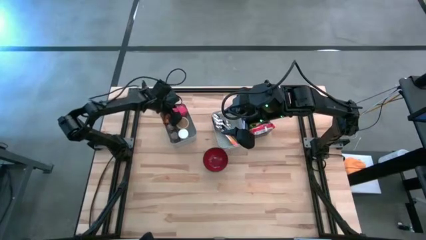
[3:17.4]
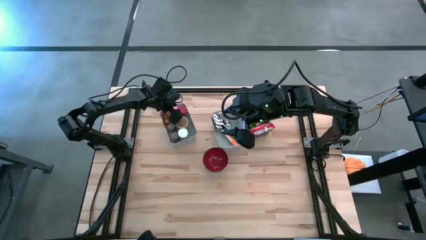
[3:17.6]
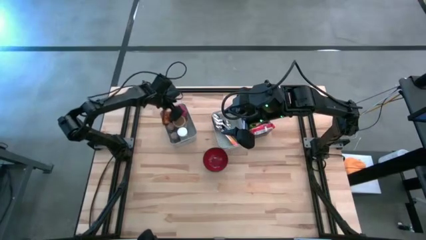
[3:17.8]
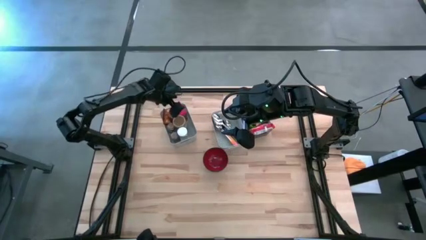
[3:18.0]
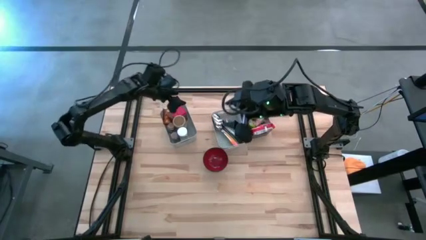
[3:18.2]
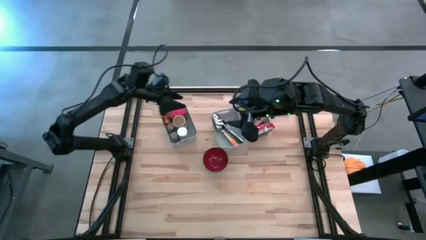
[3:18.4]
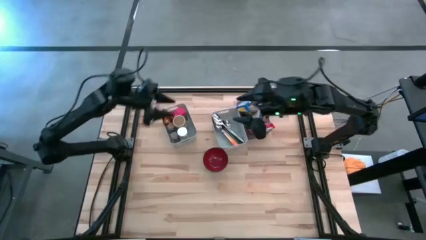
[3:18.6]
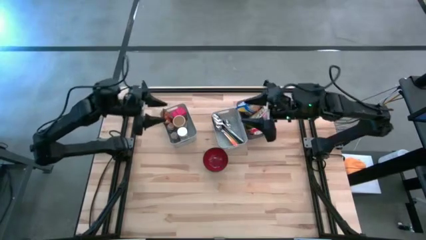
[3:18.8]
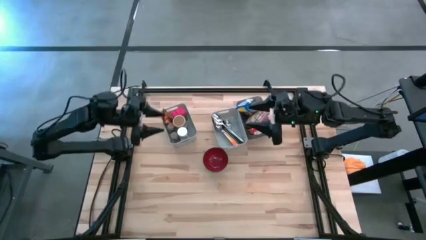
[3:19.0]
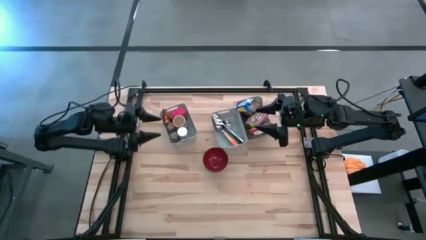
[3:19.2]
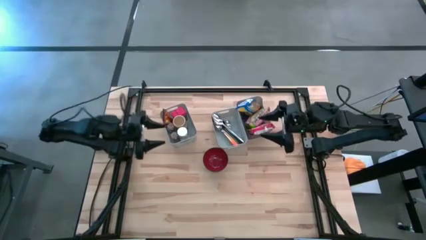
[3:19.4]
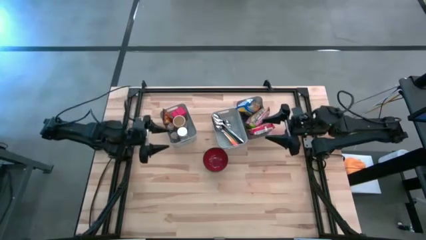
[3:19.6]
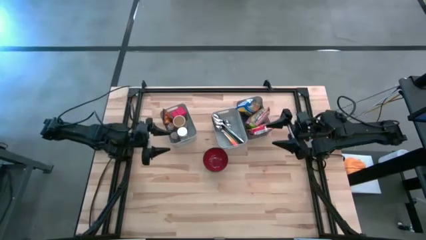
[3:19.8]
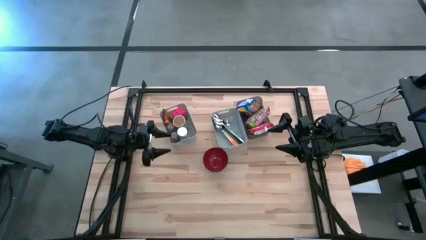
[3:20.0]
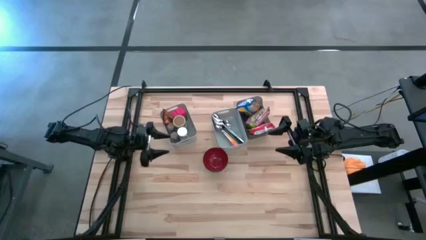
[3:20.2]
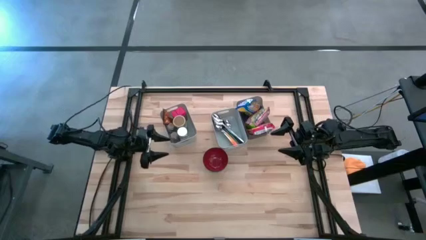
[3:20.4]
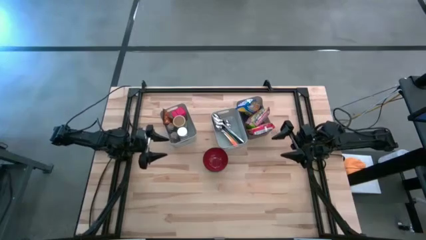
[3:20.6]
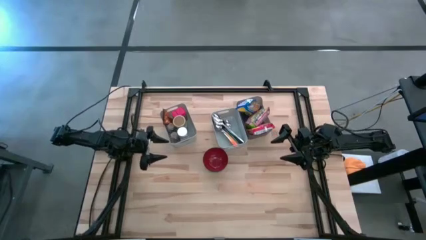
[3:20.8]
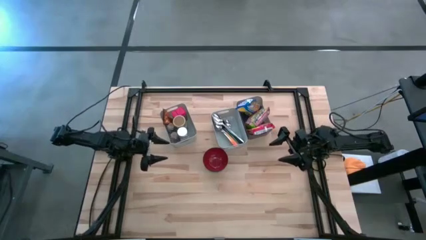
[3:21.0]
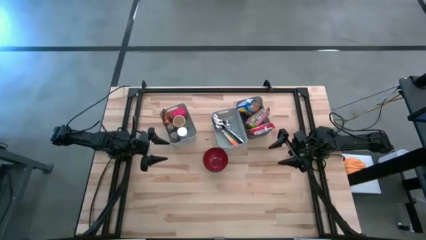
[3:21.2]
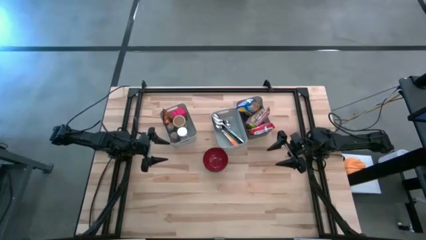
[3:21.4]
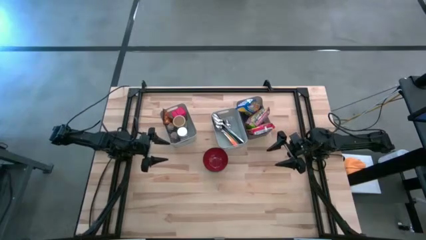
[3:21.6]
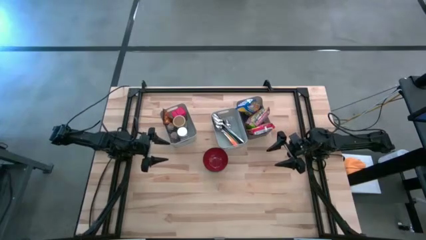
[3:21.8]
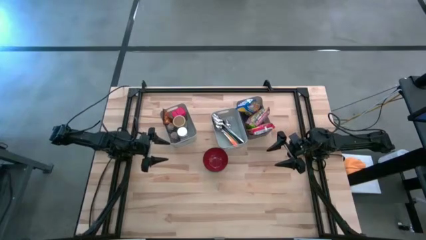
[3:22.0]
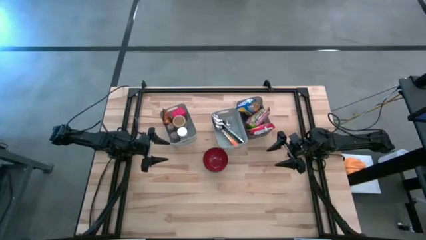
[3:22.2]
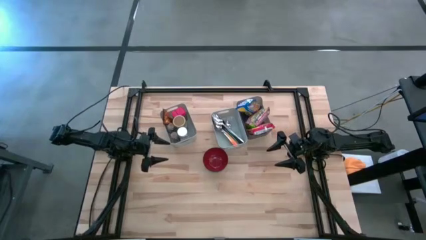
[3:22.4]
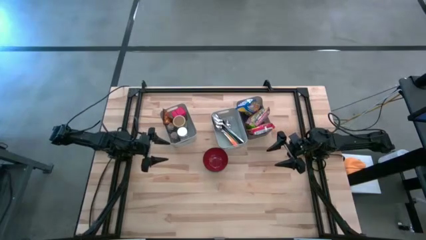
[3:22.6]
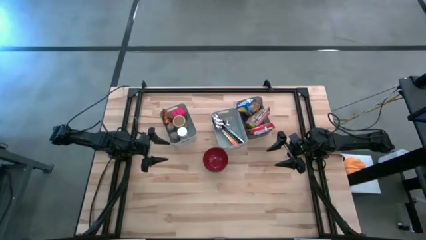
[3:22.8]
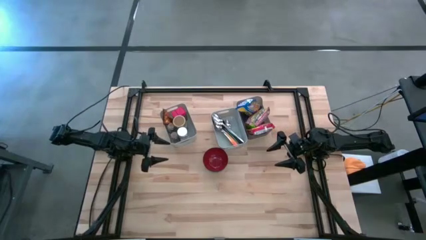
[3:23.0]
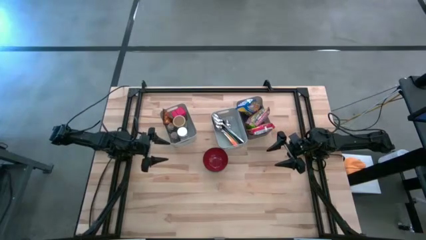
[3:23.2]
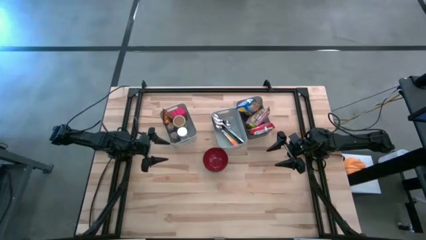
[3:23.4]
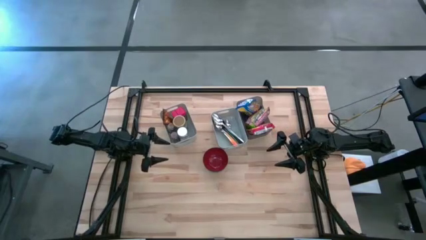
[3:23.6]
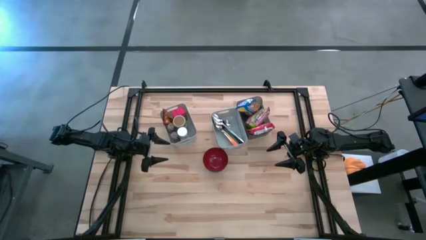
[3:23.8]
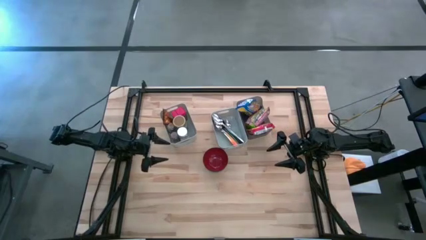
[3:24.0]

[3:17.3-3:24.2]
Return to Home Position

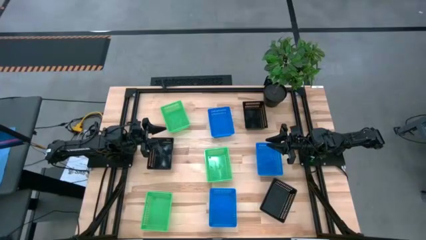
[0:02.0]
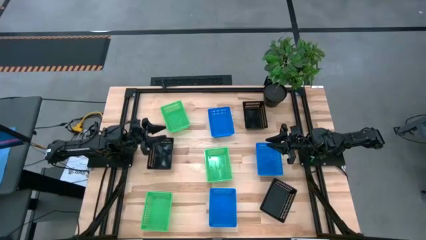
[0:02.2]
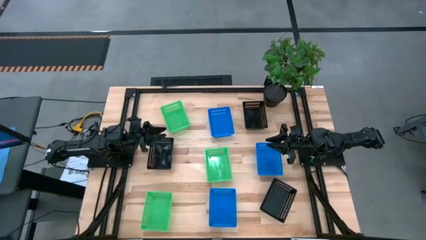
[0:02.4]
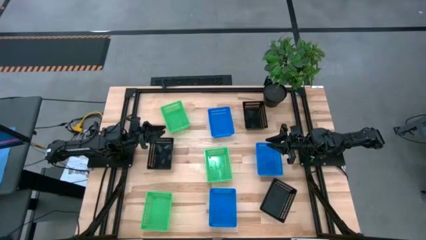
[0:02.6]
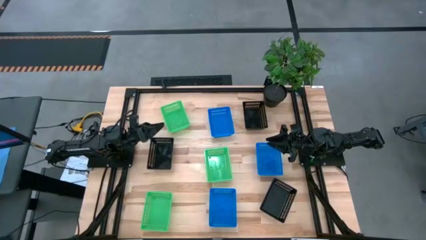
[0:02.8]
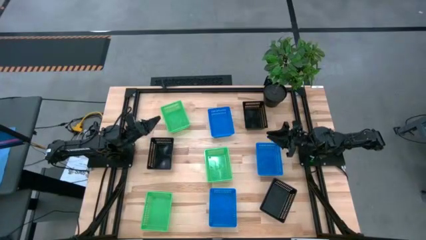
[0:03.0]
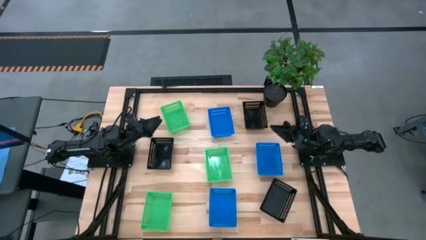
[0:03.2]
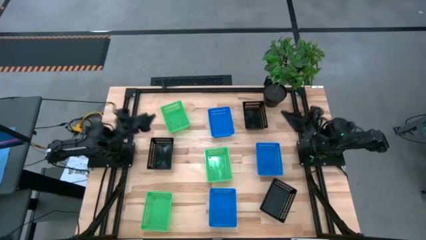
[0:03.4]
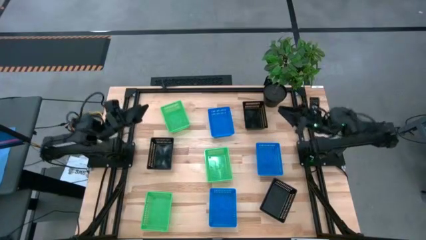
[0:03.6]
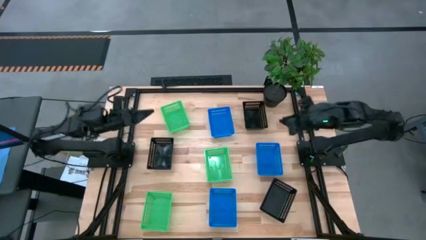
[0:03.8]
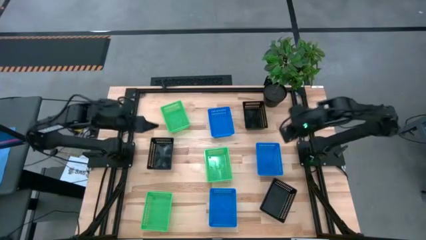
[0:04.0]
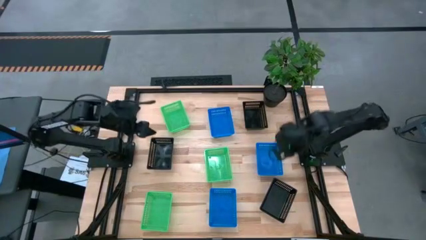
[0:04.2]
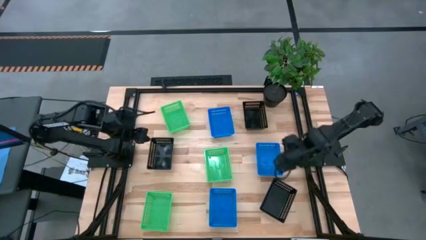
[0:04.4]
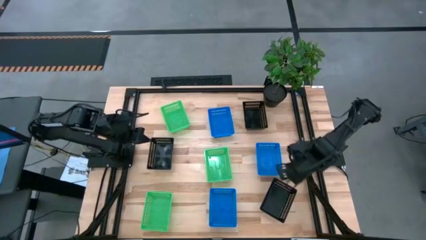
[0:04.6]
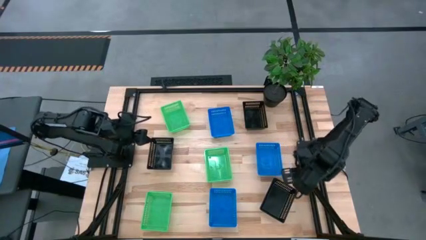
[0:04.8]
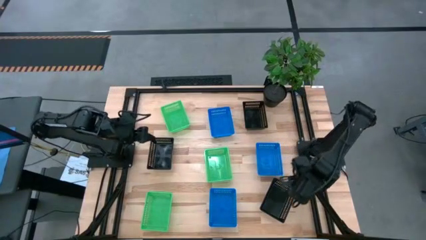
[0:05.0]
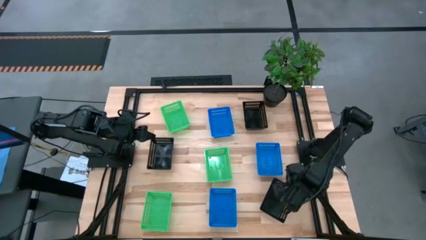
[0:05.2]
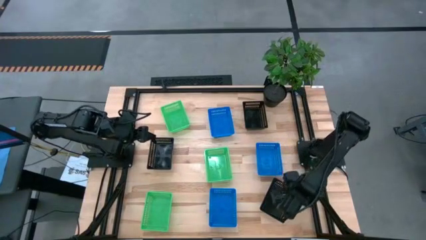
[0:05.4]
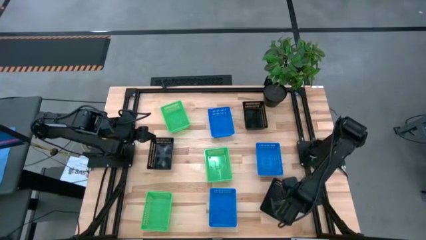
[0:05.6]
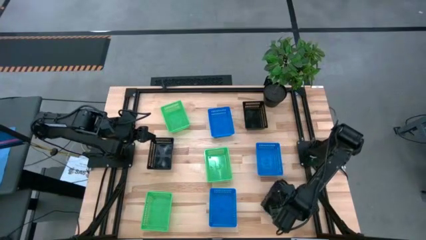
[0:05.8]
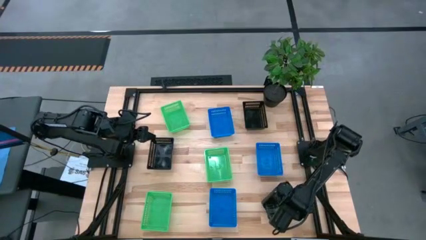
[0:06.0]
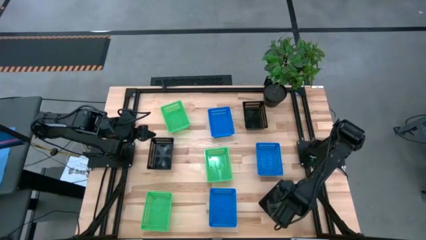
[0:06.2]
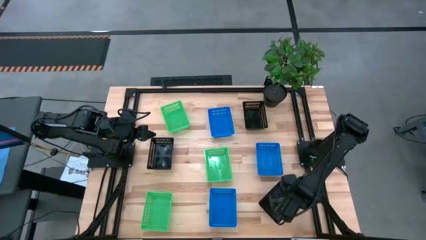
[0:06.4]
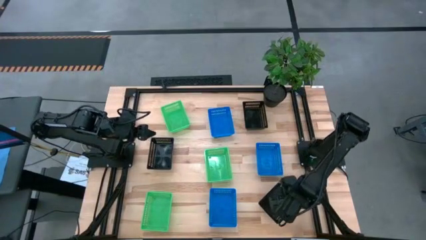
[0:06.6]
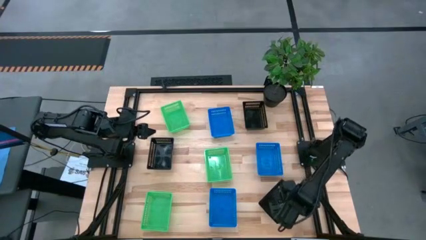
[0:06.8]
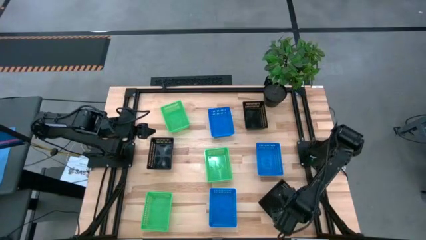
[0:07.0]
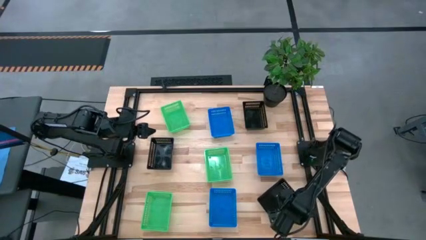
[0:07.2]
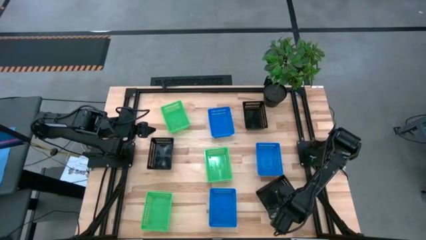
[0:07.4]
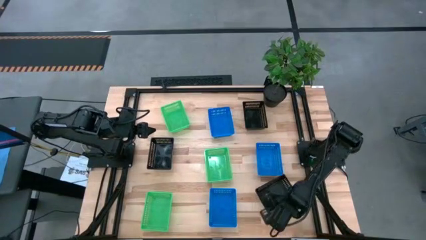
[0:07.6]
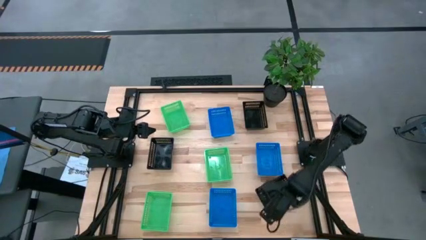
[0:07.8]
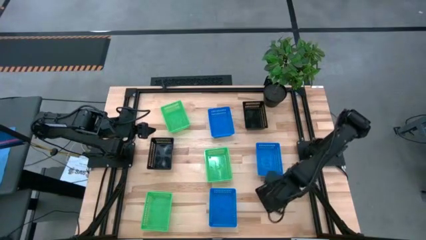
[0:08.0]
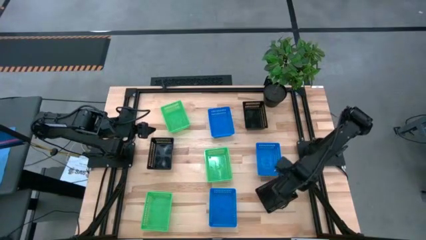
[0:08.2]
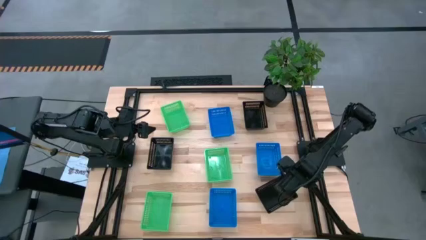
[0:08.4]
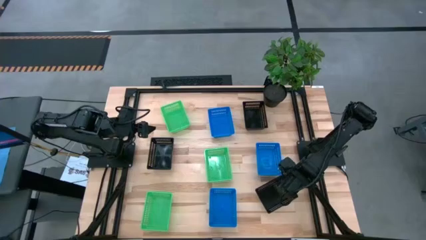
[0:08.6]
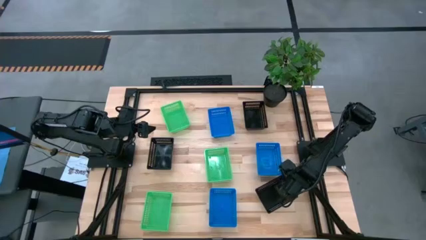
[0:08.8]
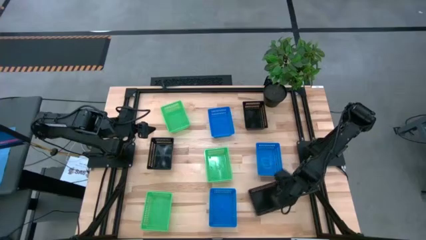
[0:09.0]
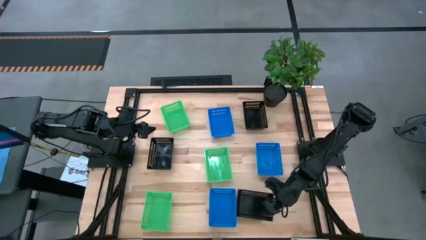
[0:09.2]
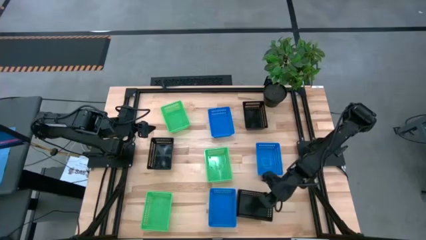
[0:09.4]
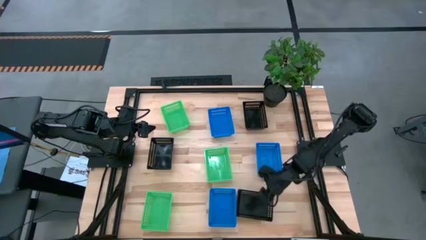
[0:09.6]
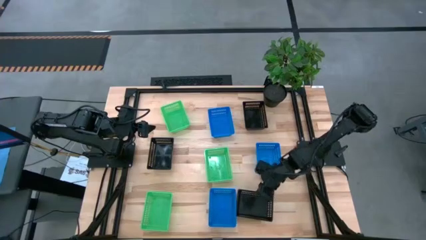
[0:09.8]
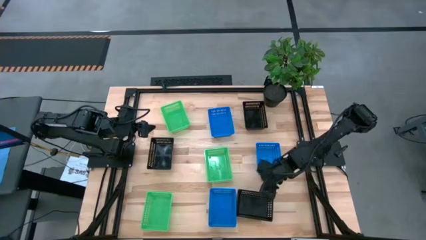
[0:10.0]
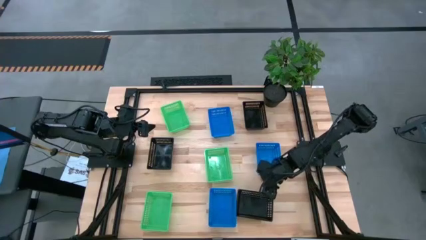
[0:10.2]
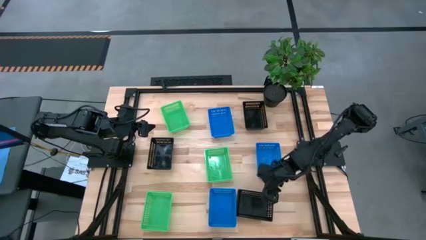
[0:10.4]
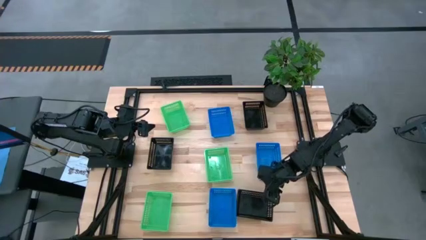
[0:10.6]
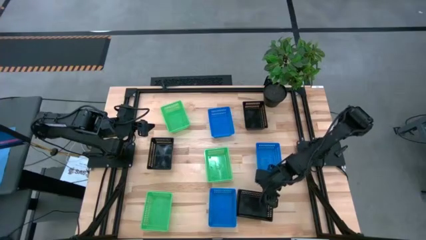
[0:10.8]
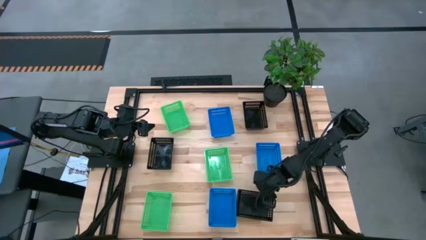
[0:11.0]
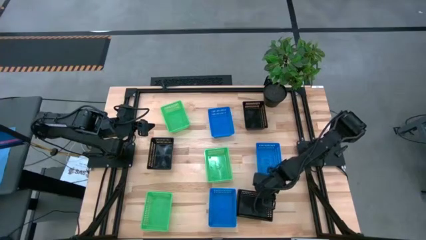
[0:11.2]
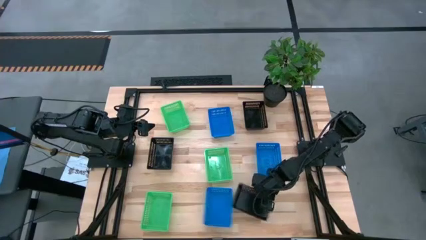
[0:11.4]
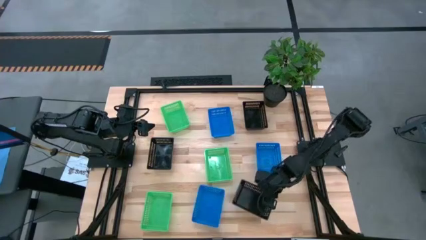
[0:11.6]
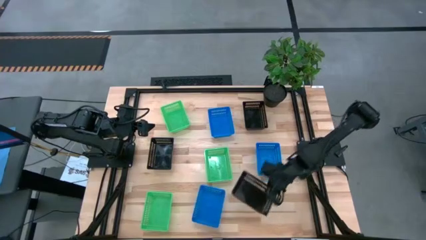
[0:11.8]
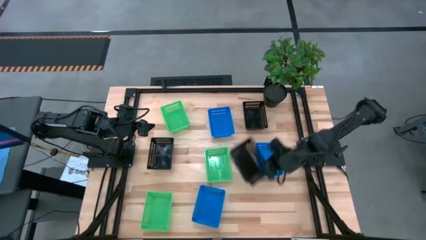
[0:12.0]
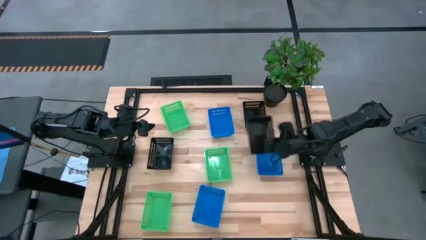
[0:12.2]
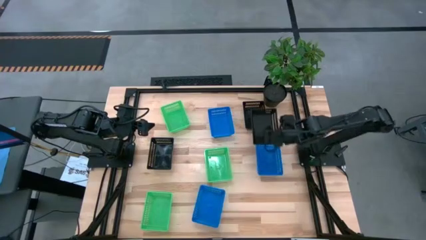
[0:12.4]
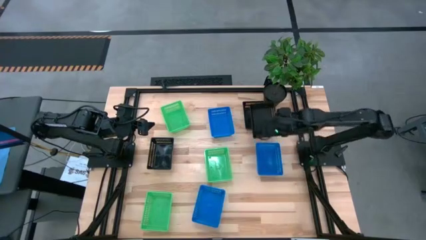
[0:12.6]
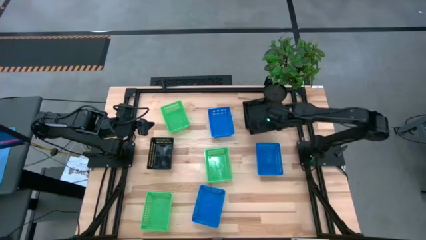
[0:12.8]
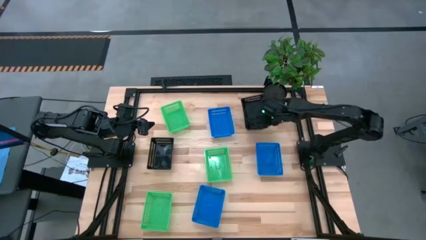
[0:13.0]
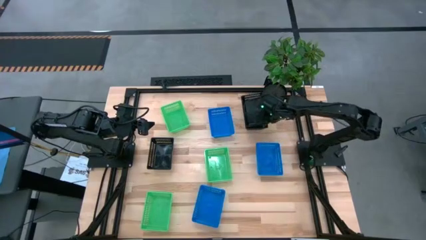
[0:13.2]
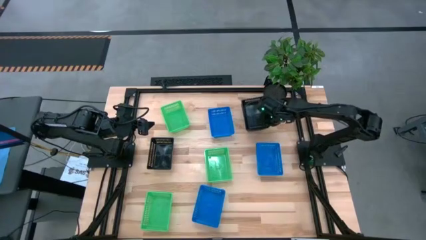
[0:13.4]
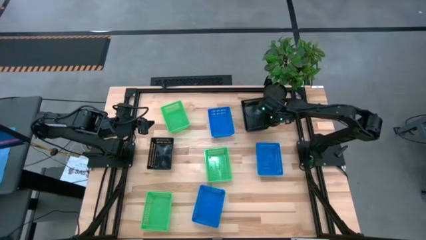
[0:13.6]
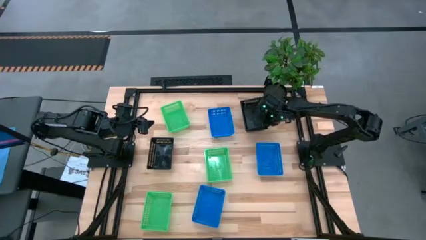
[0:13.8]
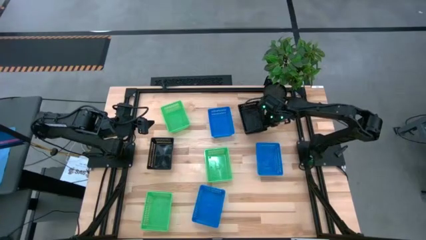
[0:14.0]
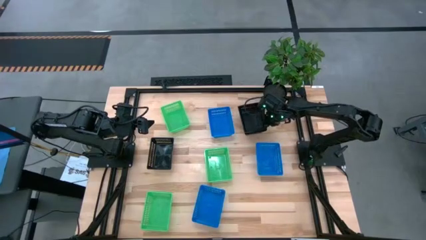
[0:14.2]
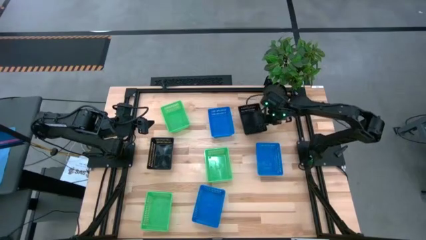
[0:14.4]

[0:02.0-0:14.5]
Stack the bottom black bin on top of the top black bin
